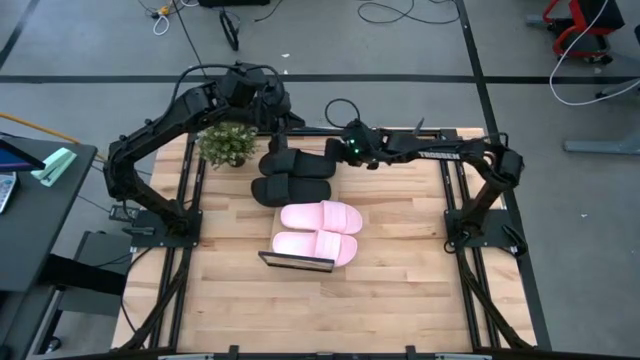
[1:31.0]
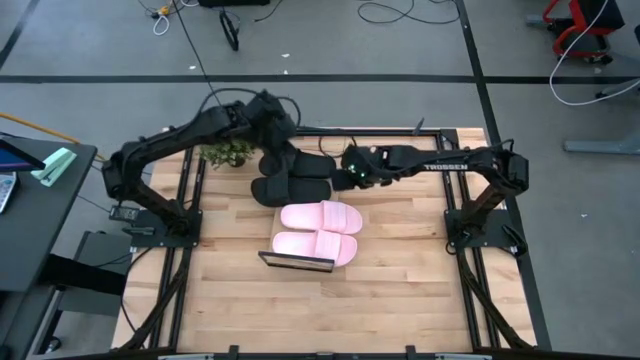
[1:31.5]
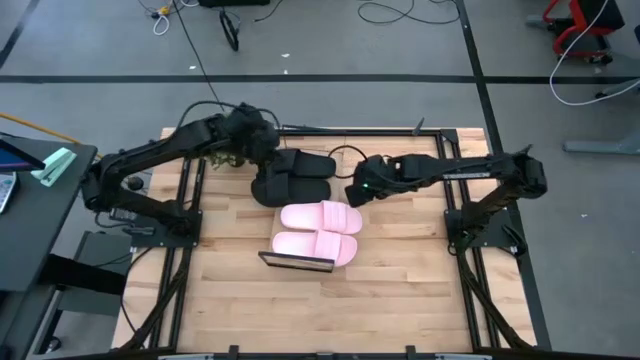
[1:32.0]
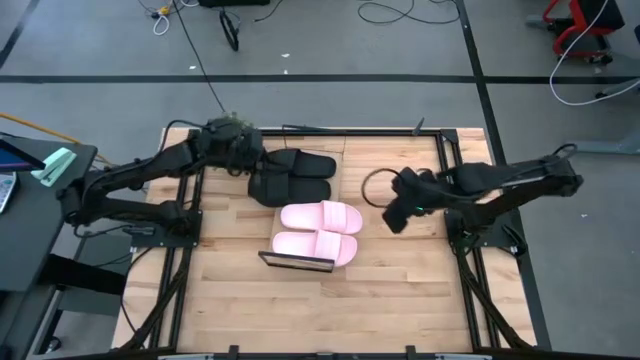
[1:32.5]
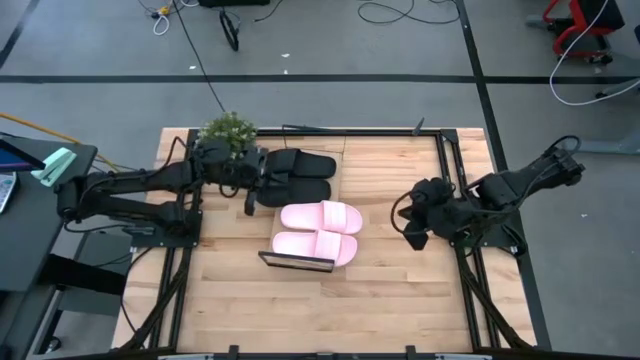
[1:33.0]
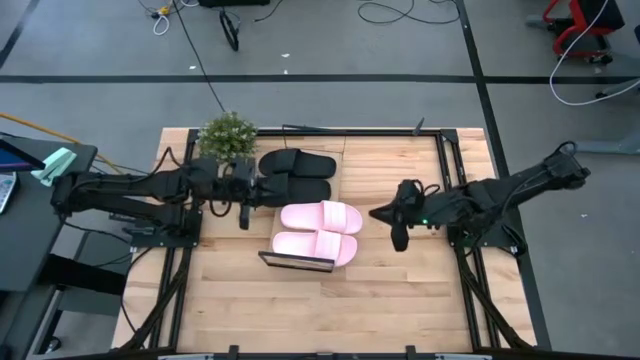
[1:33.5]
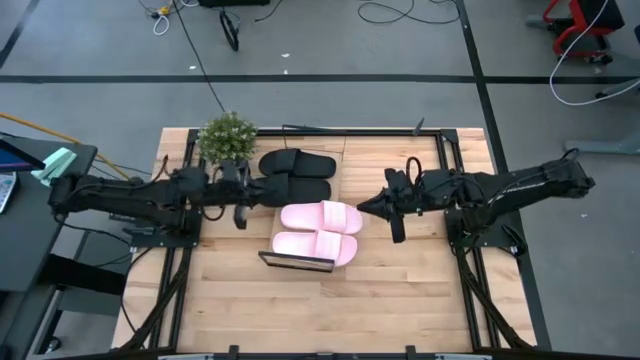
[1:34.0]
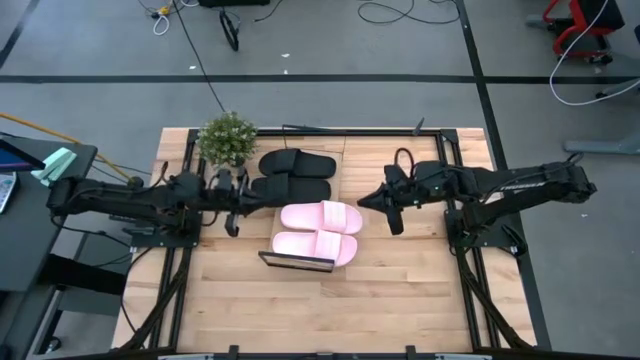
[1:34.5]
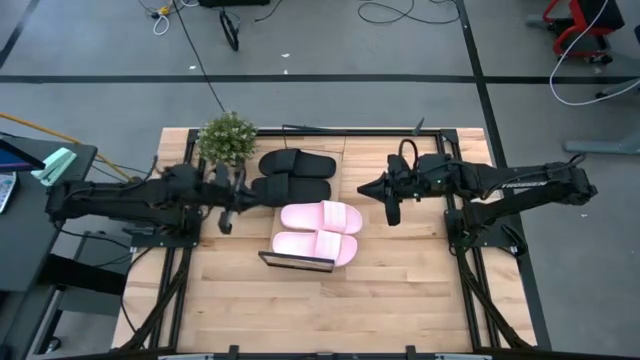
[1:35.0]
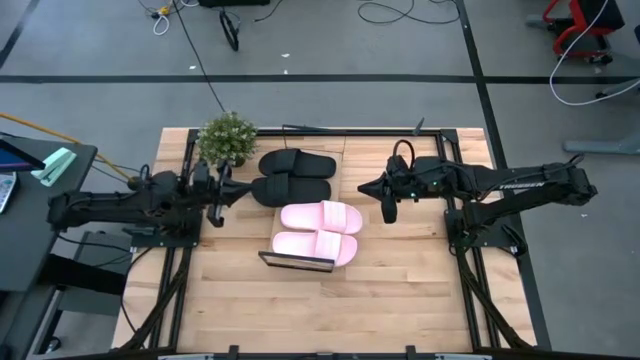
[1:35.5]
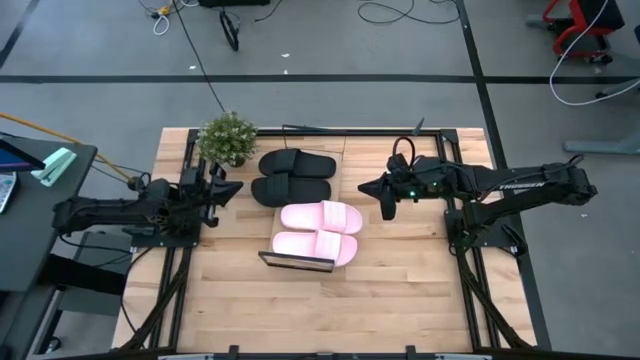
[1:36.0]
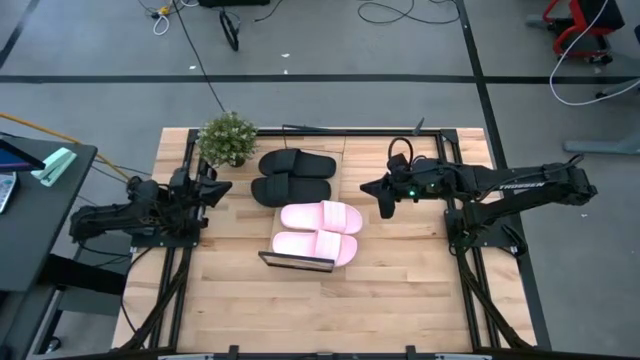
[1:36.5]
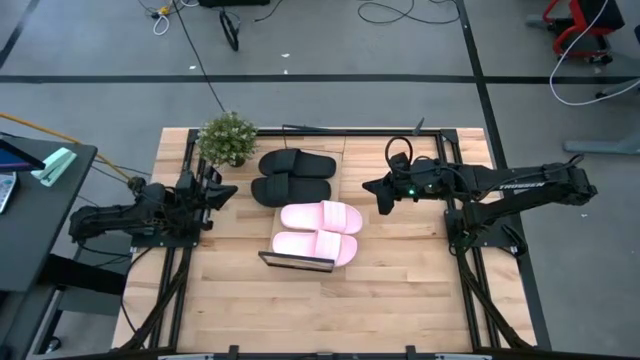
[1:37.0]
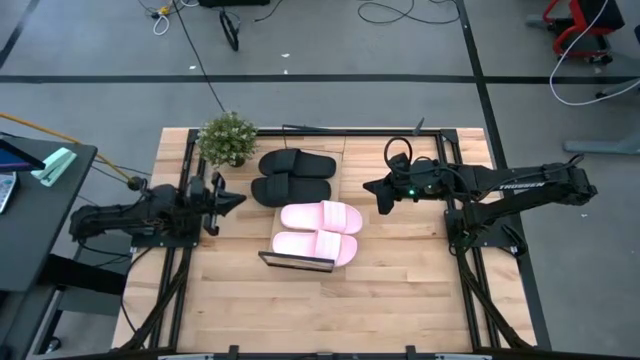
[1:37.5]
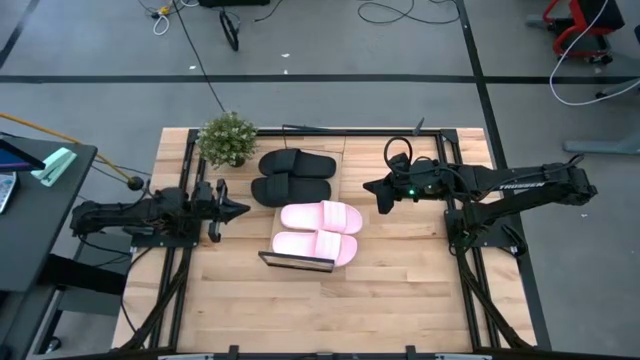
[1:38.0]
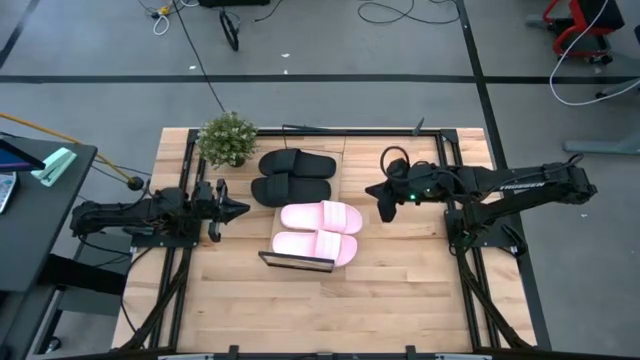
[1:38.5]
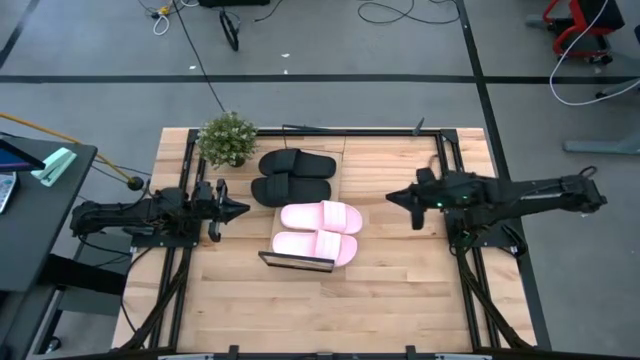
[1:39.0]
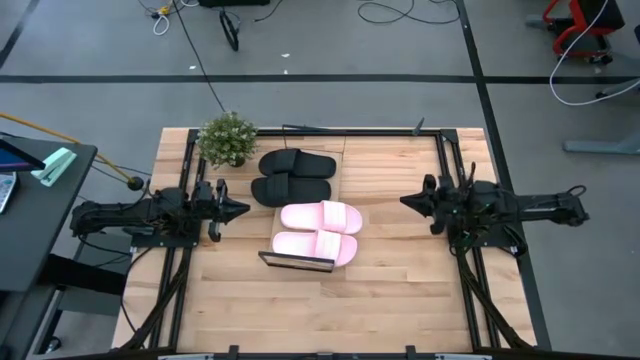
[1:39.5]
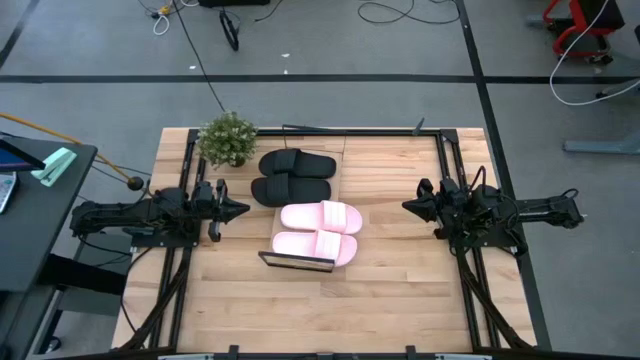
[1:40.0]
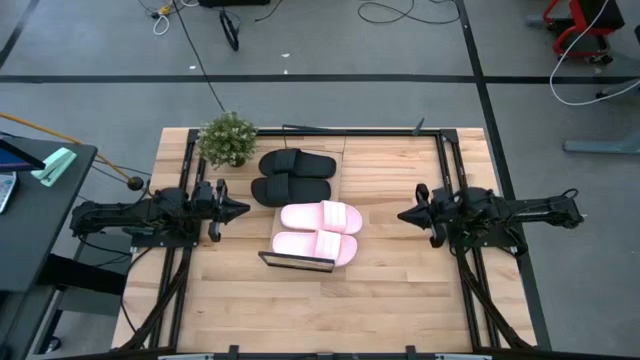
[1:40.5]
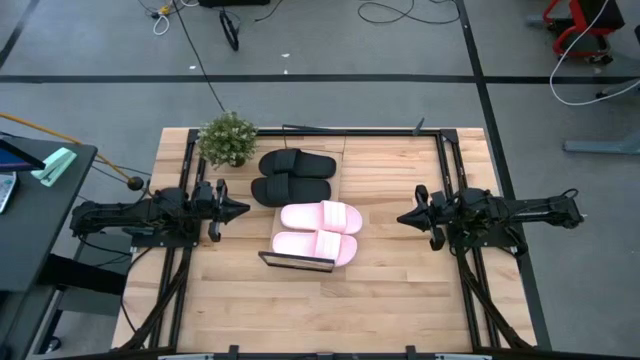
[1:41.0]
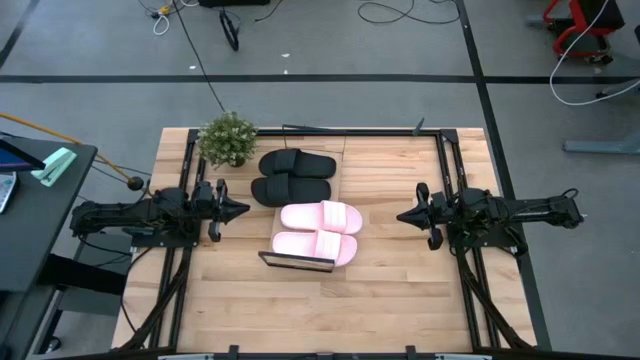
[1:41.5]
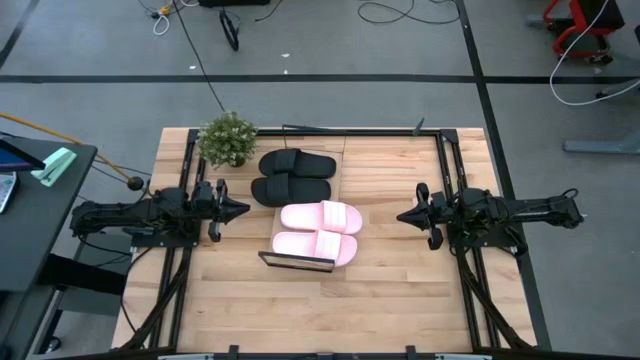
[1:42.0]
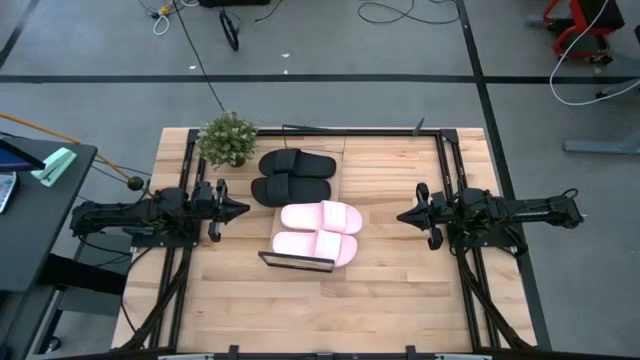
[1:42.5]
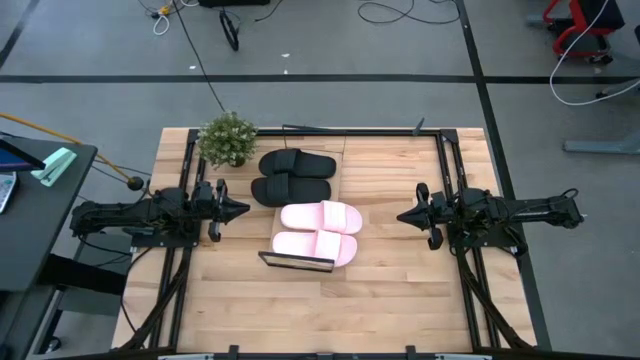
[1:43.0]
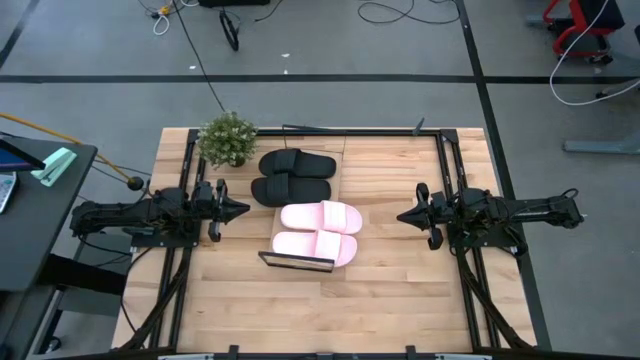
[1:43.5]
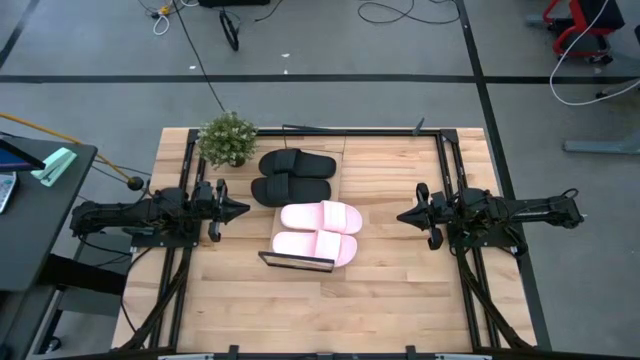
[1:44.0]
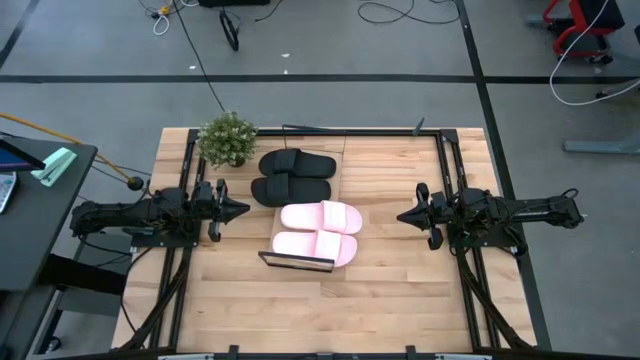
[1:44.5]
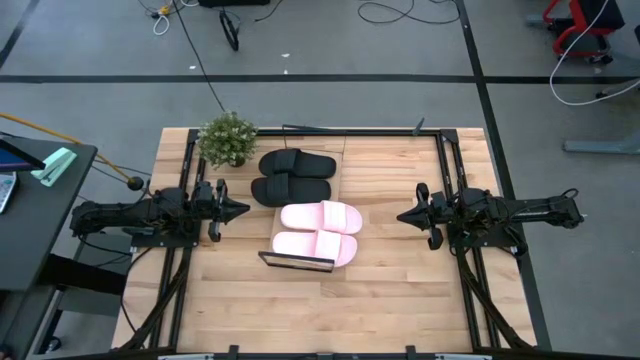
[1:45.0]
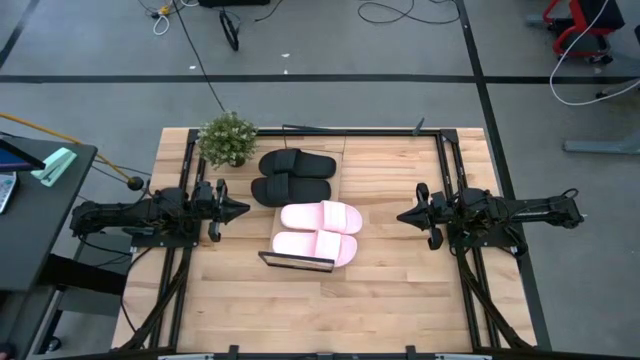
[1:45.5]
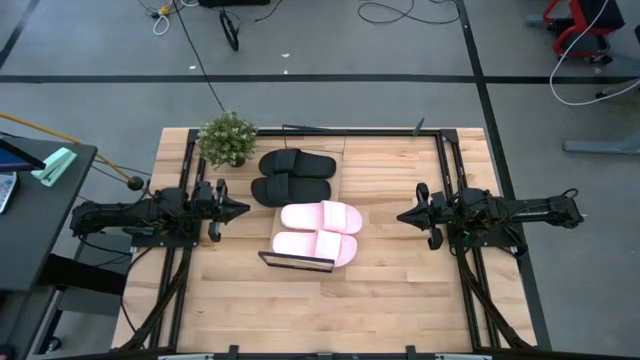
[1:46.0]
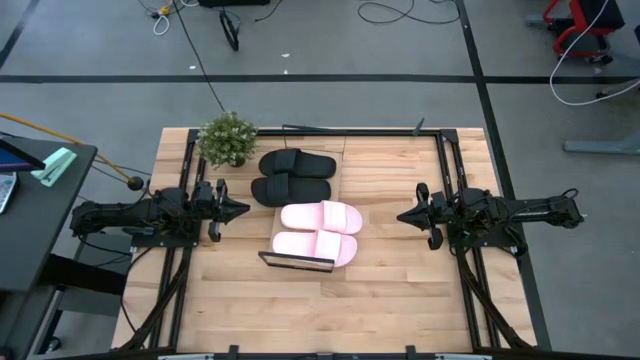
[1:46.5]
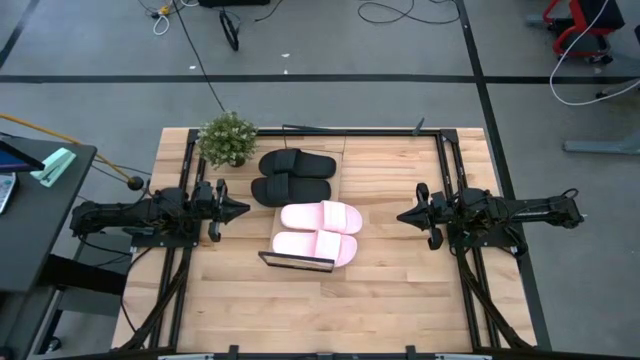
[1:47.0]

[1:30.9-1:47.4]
Task: Pick and place slides into the shelf
Return to Home Position

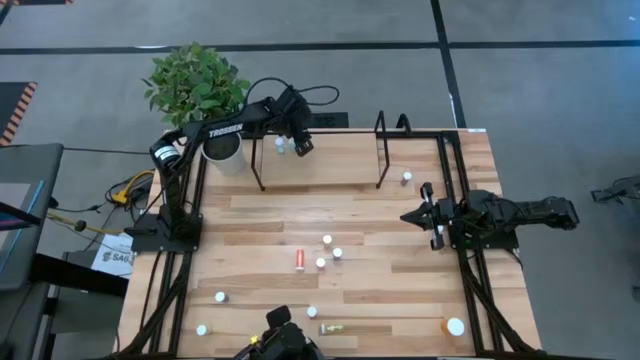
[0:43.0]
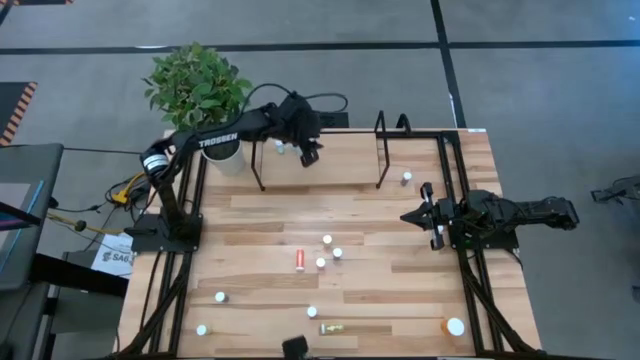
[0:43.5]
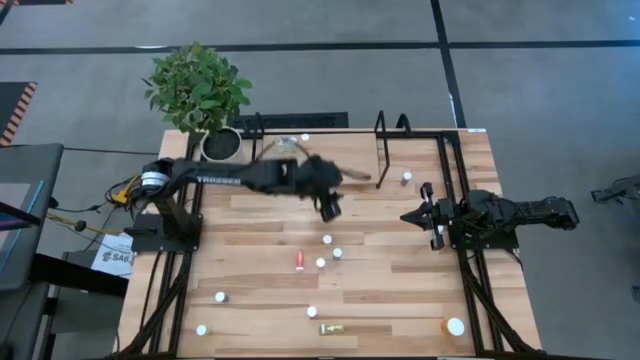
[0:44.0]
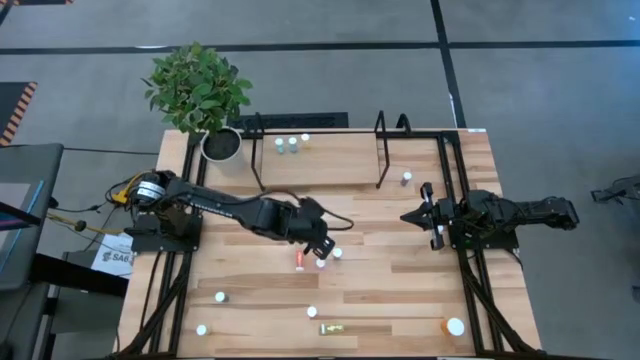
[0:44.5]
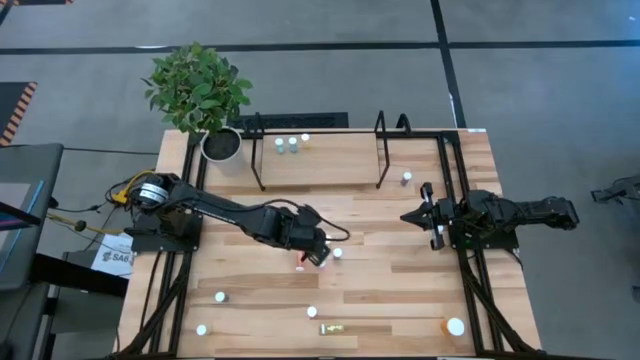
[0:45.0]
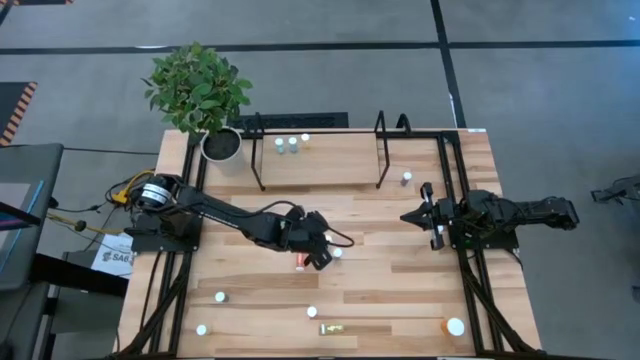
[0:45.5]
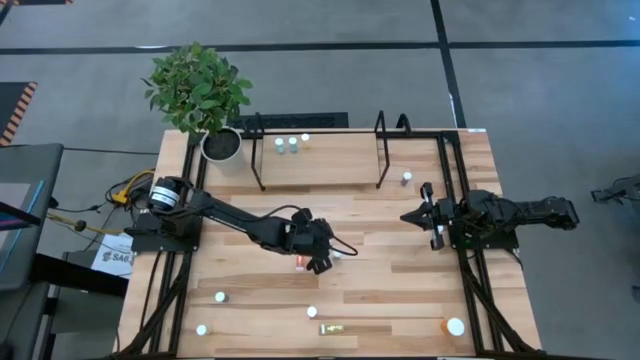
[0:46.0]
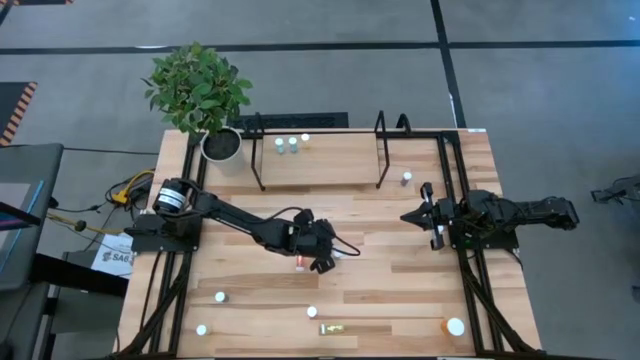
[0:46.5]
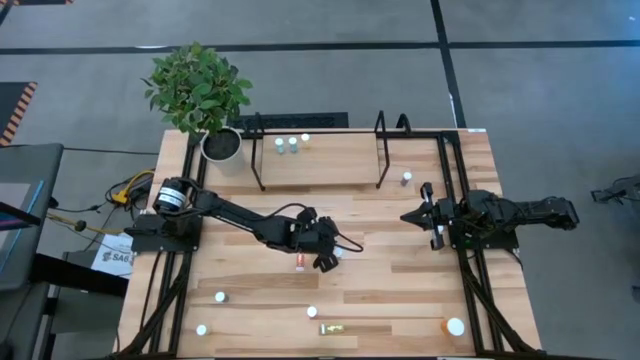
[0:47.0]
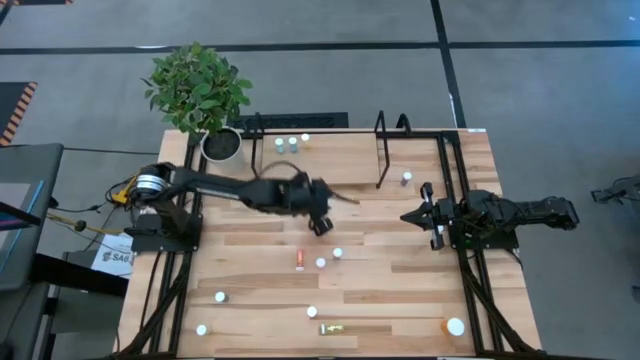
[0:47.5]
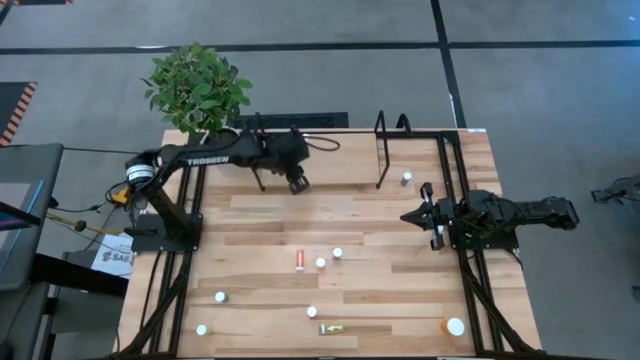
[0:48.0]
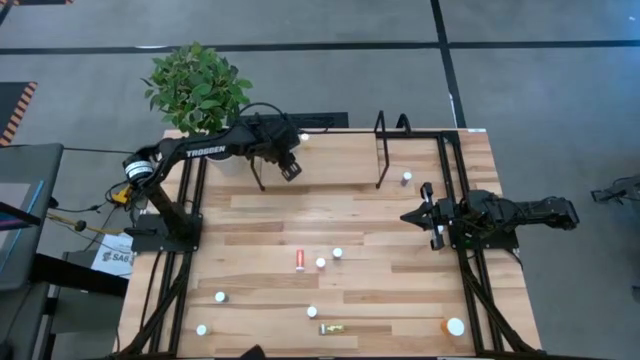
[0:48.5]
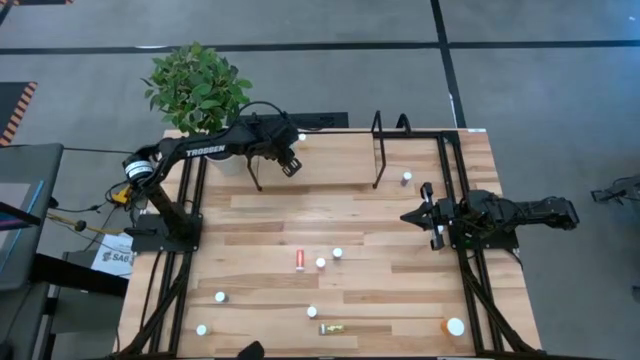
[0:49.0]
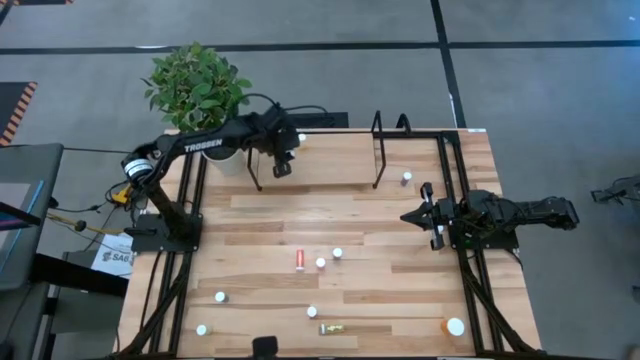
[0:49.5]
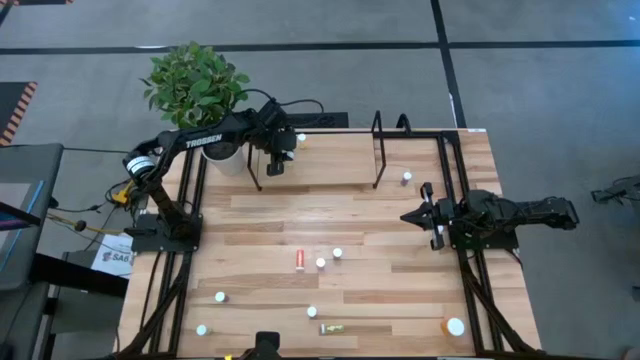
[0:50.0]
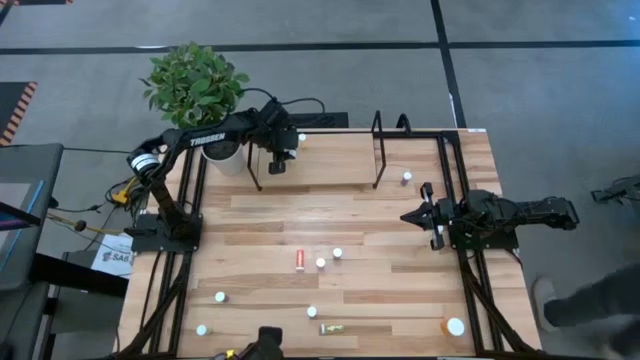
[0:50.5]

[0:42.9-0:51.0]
Task: Pick and place medicine bottles onto shelf by color
Put the yellow pill bottle on the shelf
